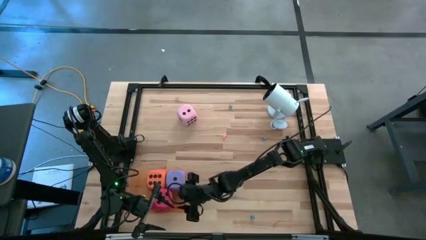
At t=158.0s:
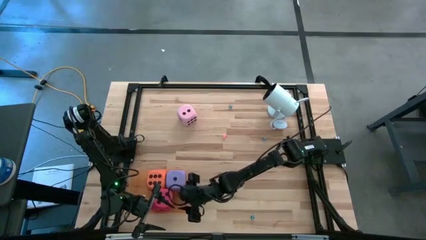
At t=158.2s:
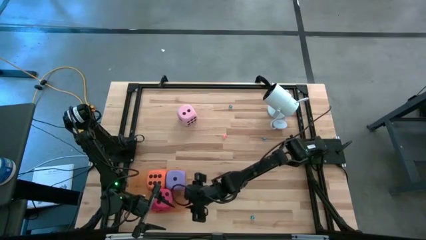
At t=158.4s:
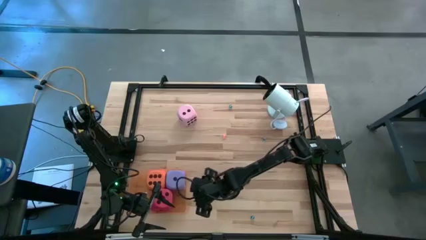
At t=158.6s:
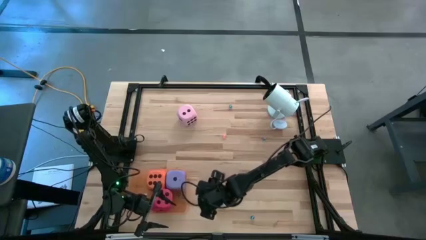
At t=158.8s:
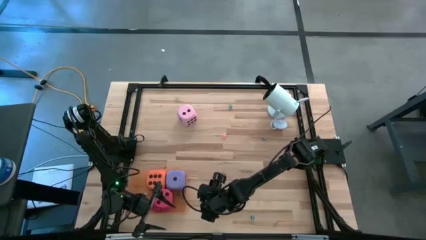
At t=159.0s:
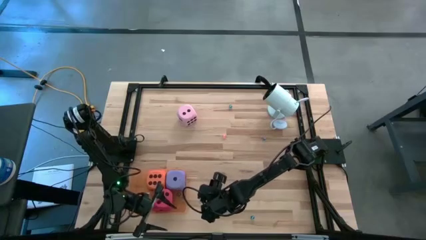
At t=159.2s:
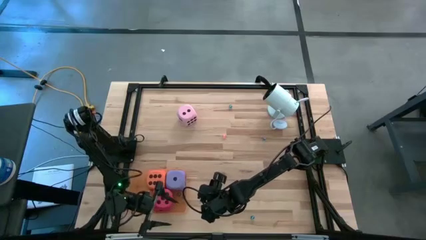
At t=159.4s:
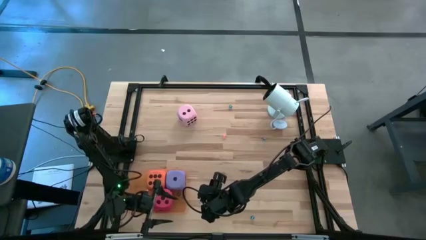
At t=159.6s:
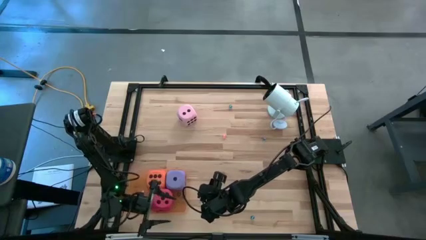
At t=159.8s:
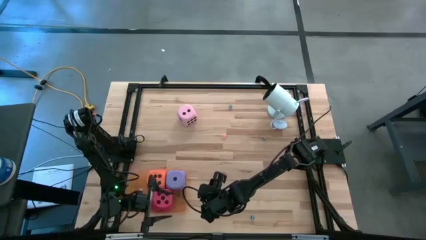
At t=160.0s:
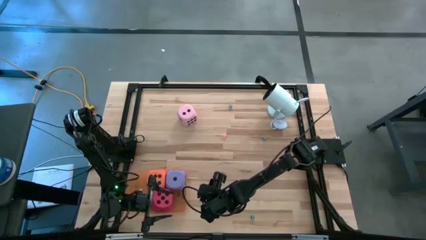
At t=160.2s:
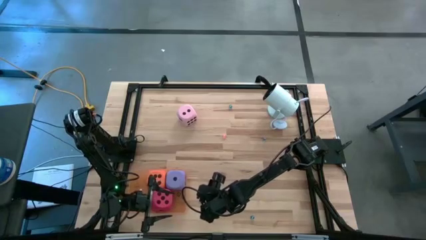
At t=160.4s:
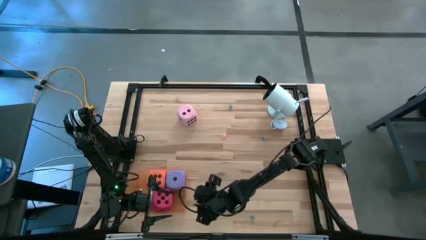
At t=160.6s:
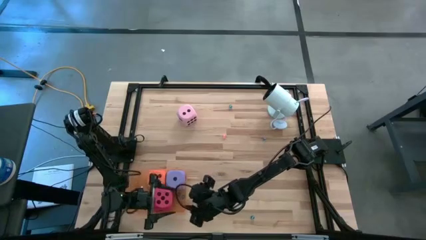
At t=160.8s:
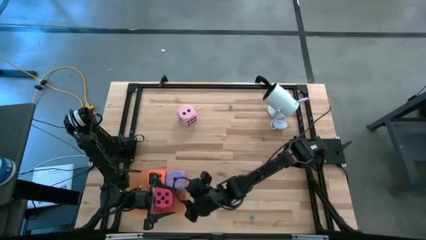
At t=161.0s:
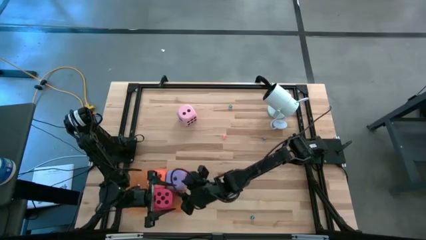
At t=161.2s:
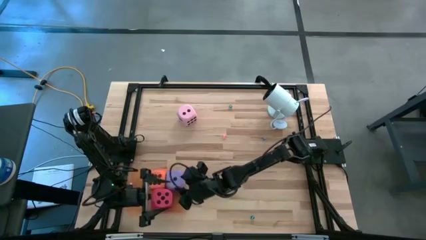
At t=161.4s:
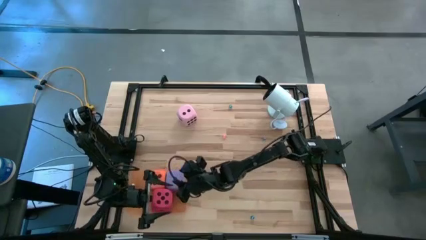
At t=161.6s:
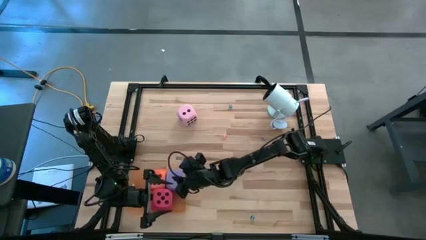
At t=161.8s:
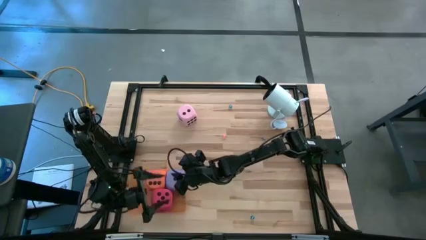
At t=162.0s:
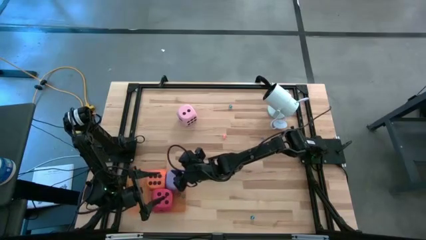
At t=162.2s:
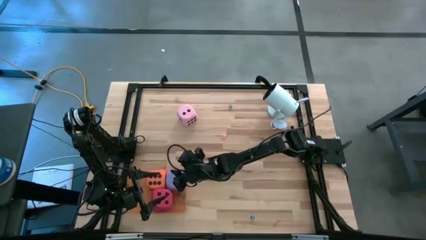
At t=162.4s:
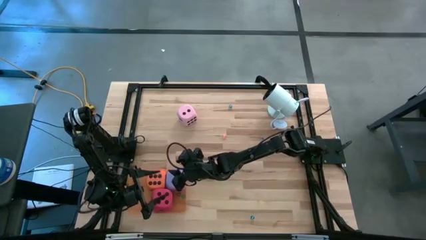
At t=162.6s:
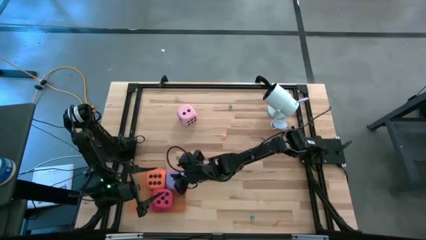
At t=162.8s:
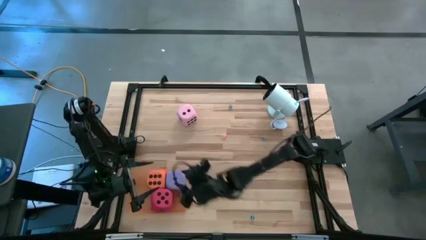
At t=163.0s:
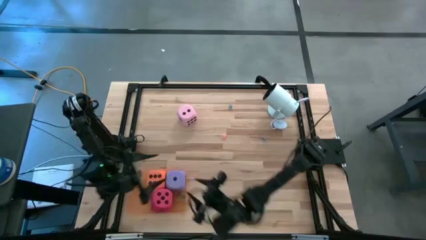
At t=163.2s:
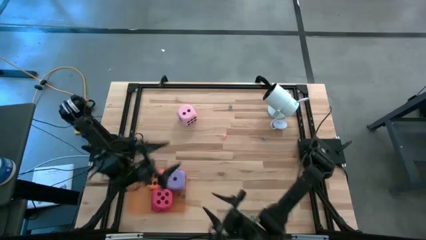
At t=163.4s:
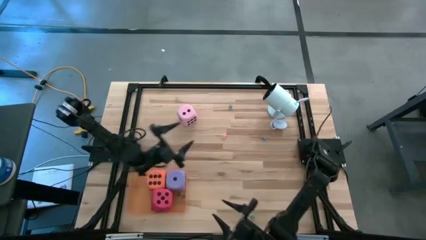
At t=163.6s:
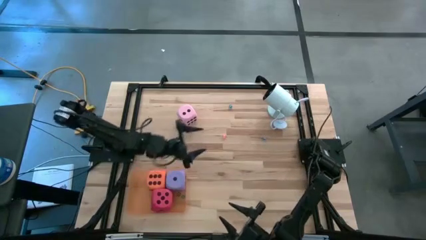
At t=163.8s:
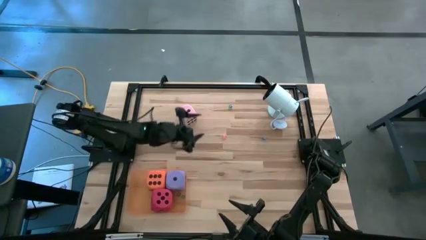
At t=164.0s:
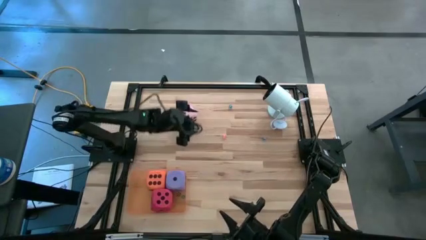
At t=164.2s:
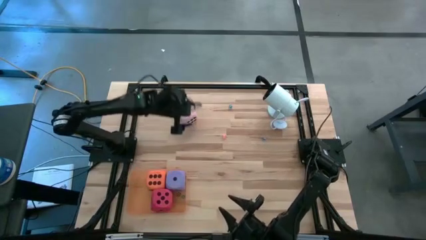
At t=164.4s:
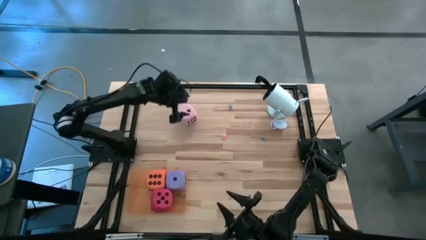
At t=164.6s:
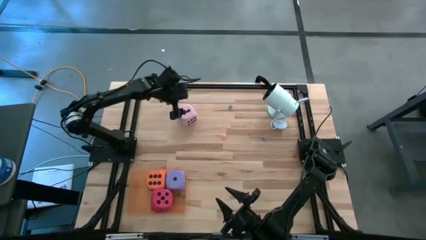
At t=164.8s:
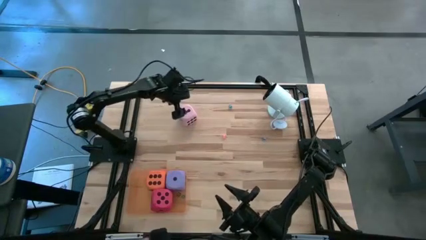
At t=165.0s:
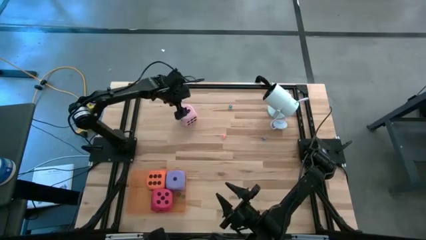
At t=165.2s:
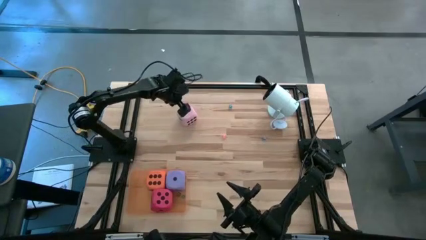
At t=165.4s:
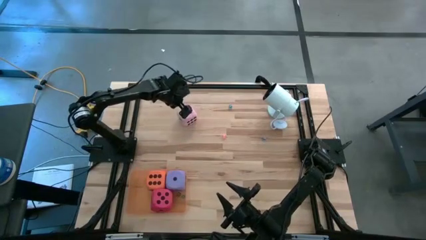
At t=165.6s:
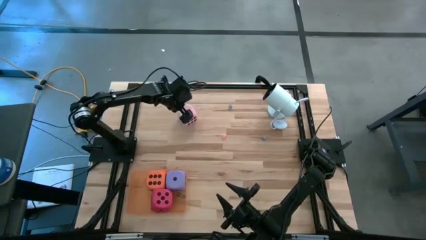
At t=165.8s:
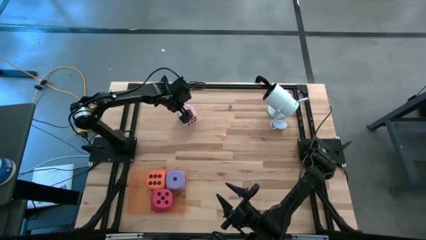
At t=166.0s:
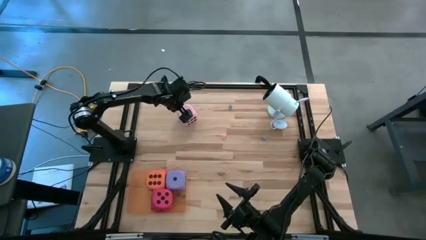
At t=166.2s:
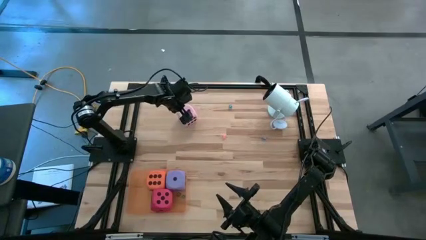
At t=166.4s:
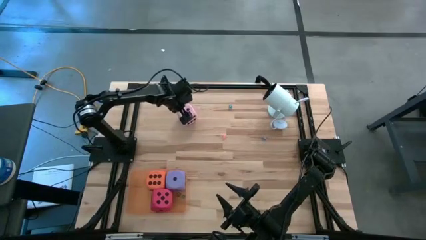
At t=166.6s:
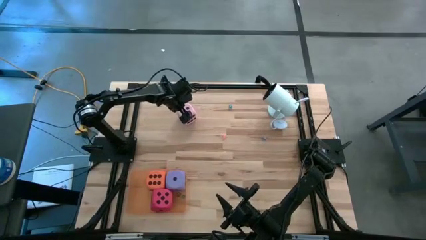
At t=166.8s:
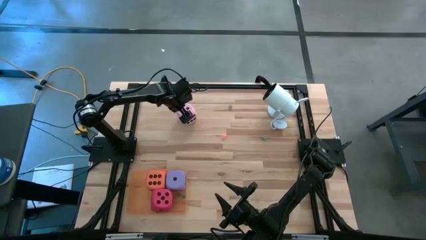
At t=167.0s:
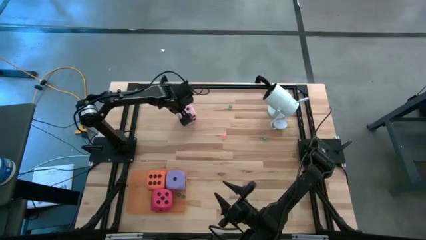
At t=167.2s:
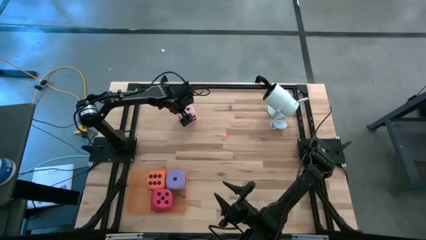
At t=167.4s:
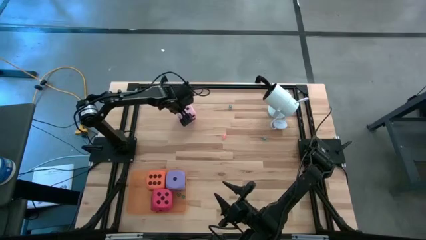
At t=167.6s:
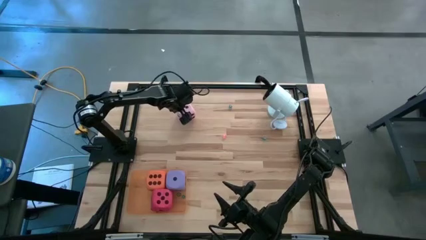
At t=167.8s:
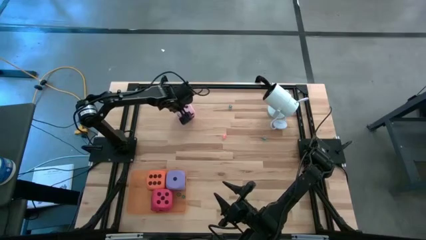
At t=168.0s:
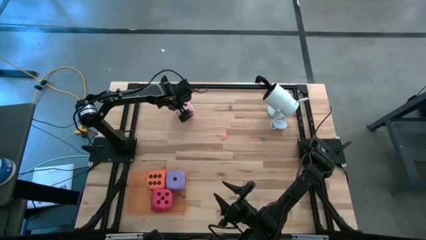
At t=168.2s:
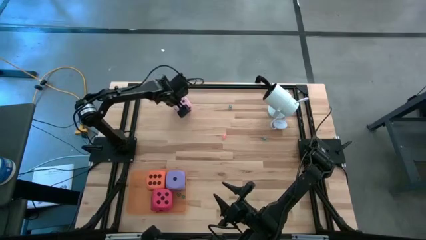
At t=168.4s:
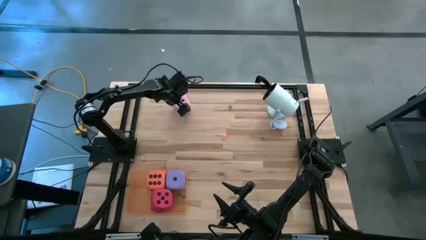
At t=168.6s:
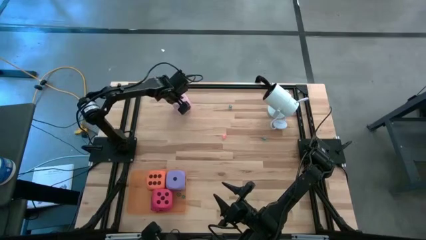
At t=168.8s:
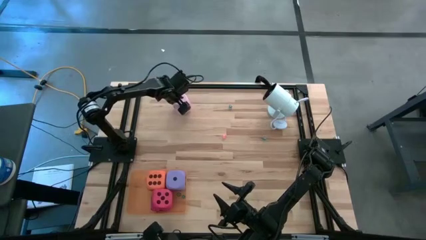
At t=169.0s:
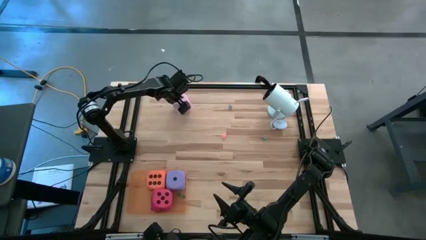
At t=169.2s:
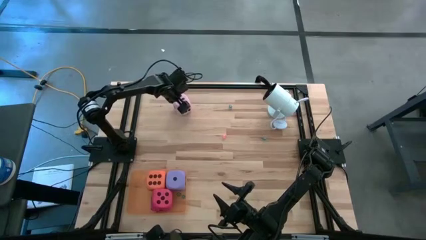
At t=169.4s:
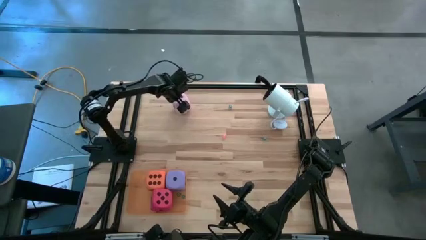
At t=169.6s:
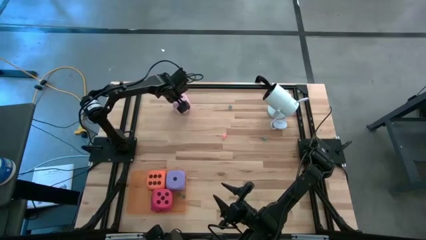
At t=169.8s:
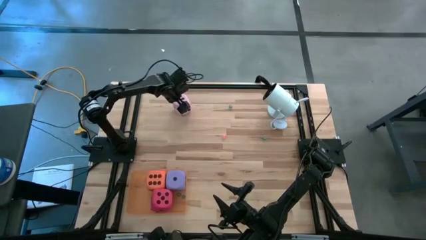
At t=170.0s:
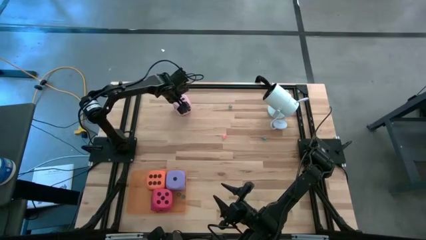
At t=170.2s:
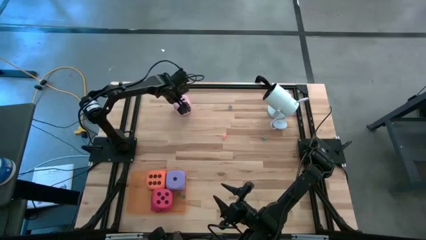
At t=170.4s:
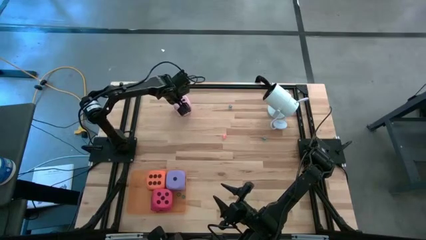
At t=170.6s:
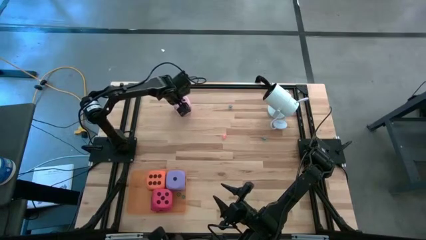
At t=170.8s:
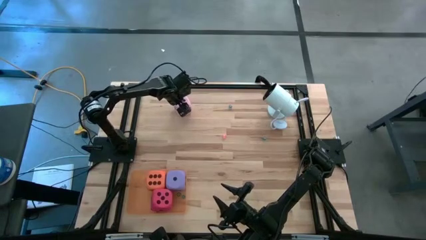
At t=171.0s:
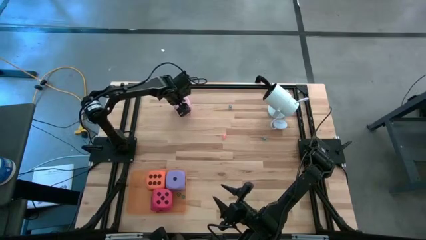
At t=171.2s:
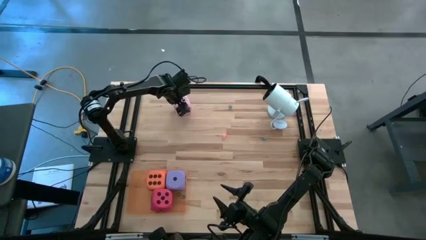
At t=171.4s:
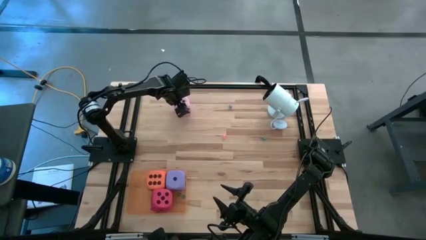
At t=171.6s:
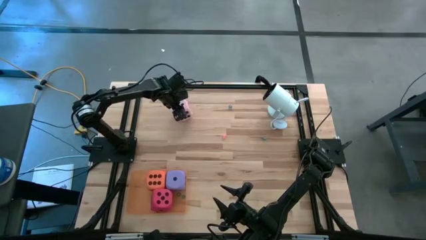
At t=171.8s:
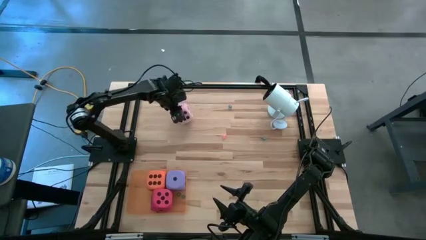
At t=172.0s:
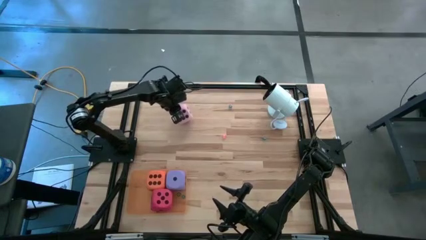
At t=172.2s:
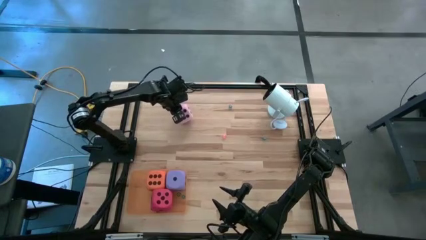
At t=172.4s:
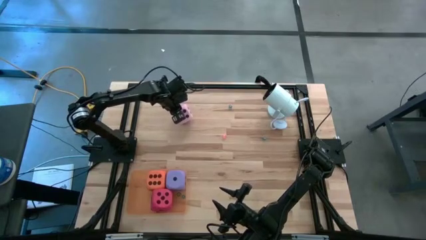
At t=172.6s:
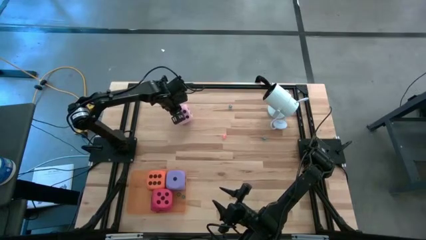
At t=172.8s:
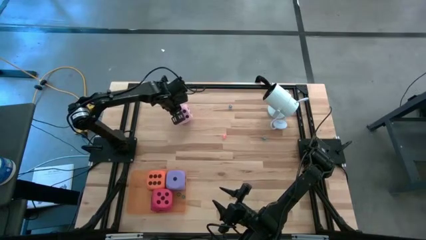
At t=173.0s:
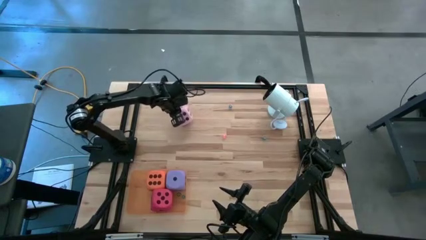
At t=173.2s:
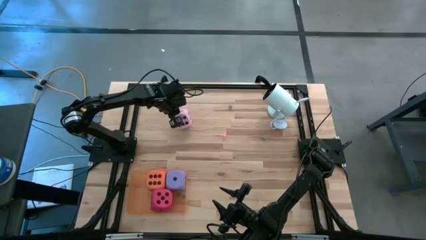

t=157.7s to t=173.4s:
Task: Pick & Place Dice
Put the large pink dice into the orange bin

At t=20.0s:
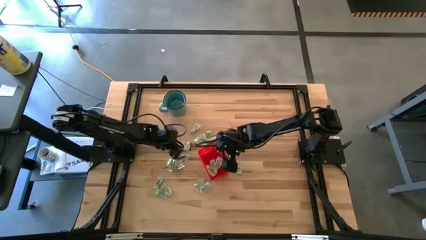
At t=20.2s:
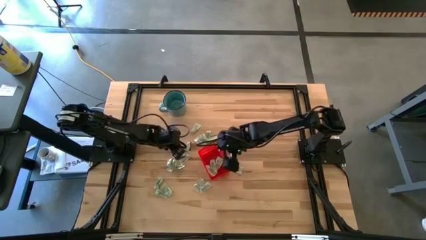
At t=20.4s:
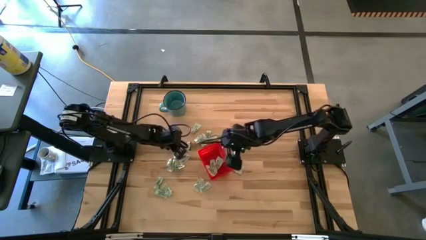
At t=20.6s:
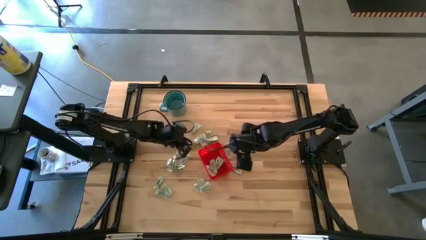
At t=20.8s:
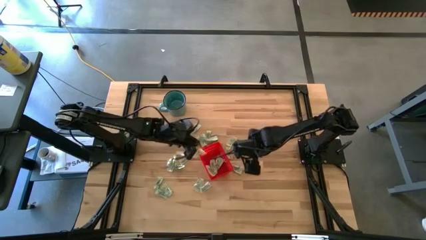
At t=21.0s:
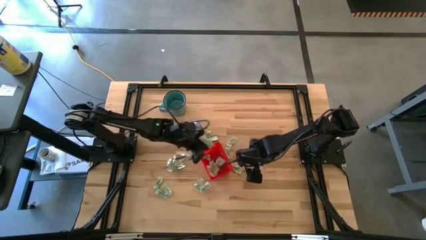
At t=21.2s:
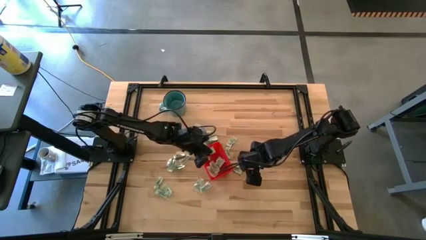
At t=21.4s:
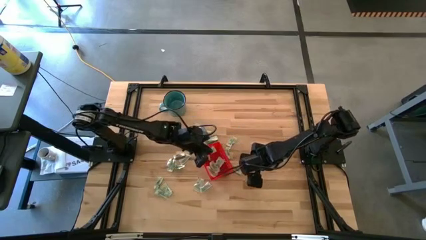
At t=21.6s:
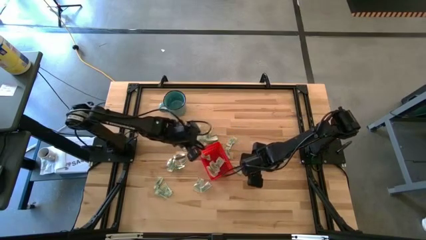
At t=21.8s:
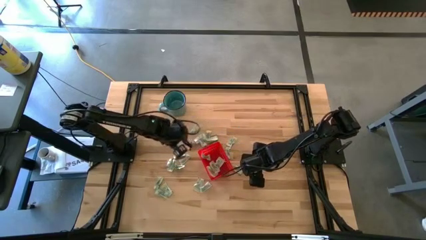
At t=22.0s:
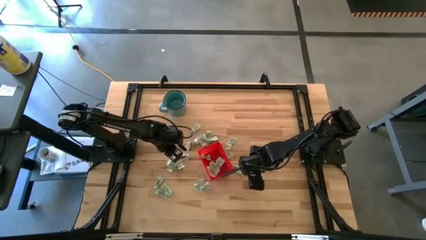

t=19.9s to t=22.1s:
Task: Pick and place Stevia / Truvia into bins
Put the white stevia packet into the basket
